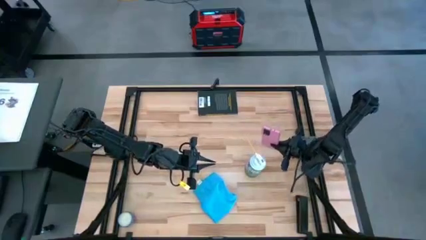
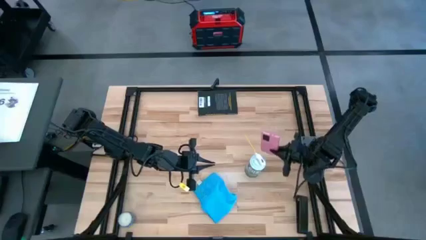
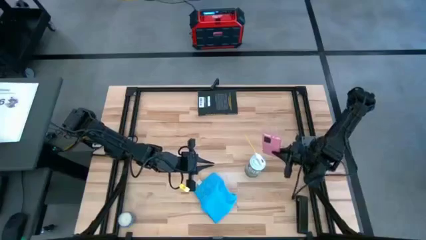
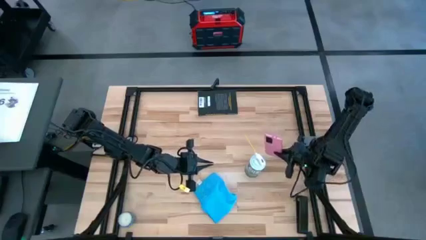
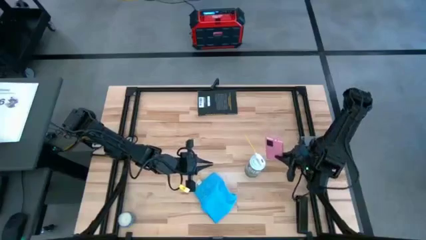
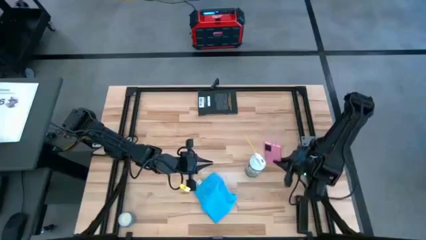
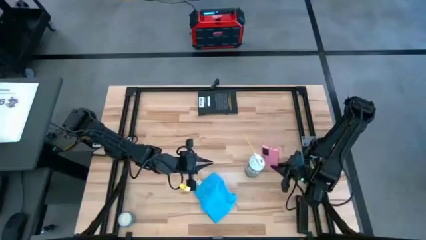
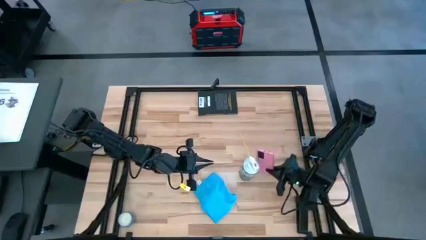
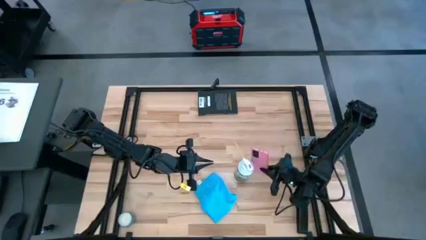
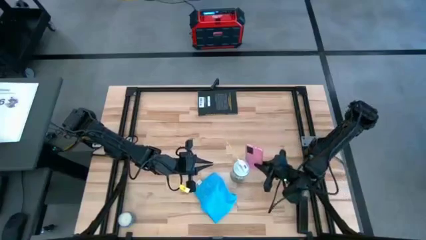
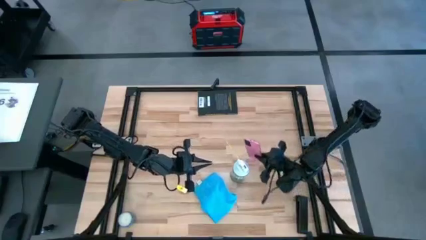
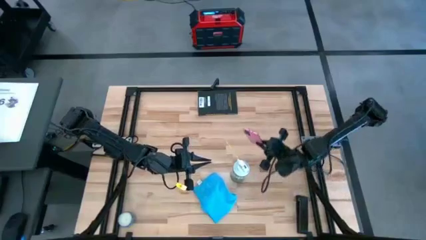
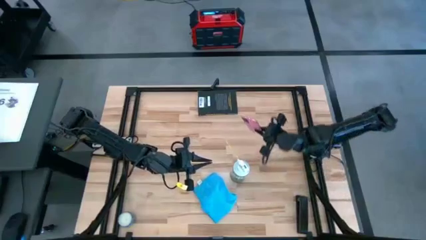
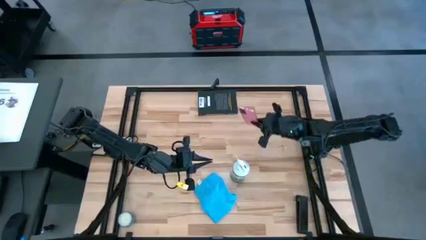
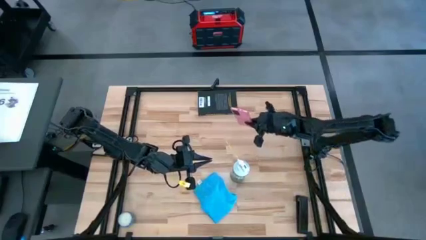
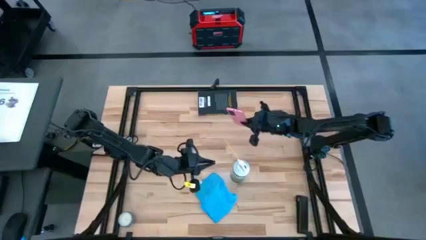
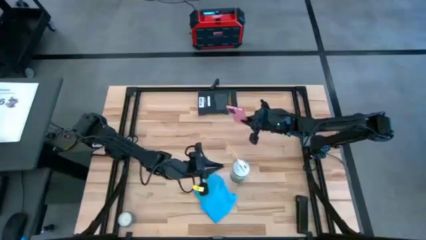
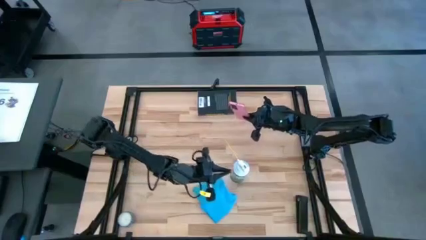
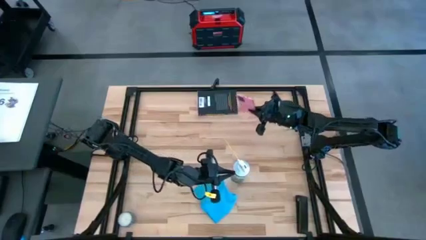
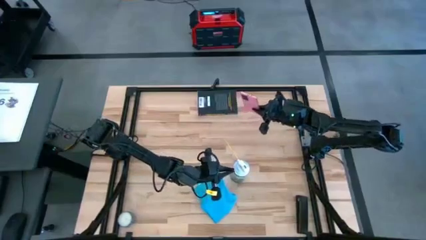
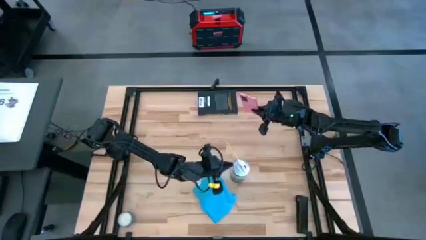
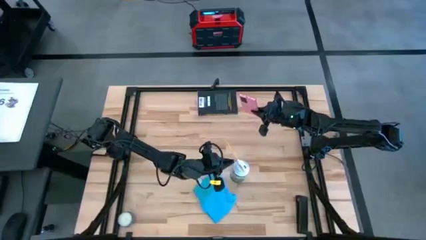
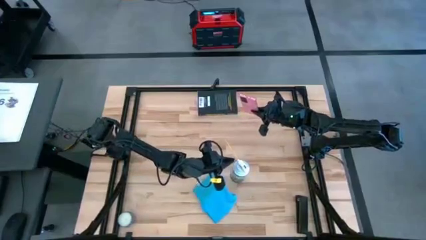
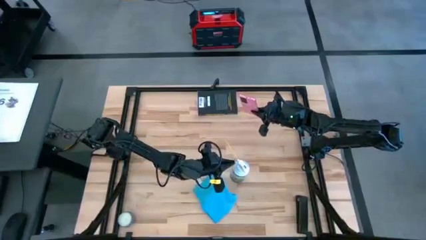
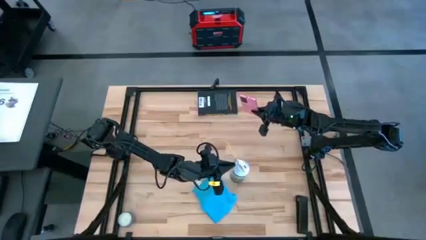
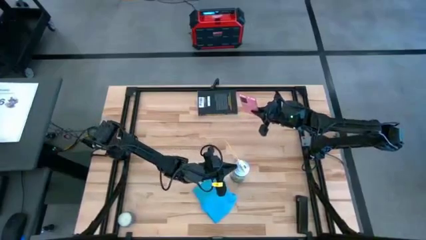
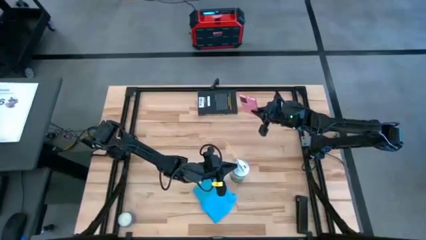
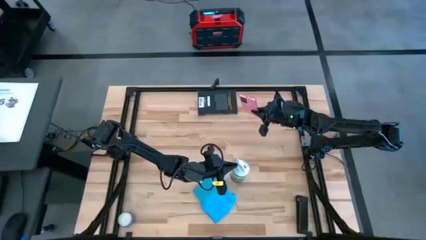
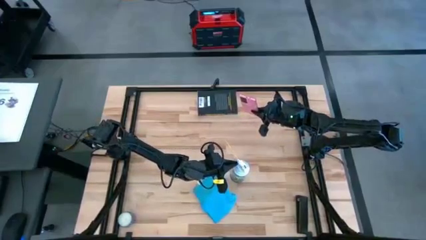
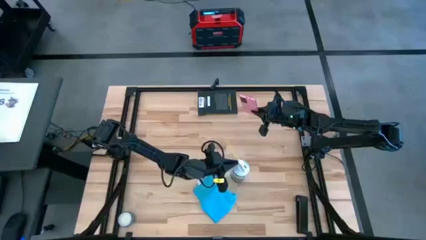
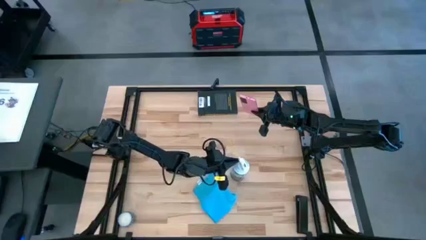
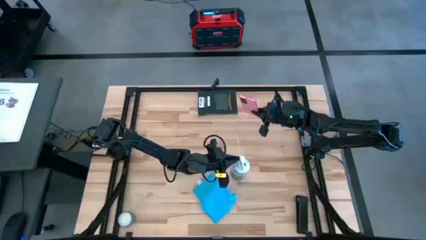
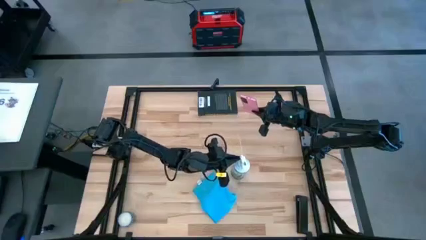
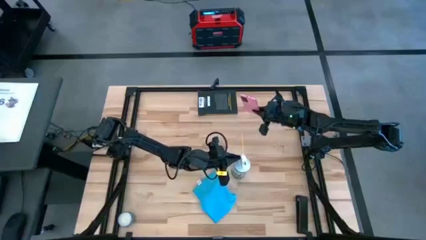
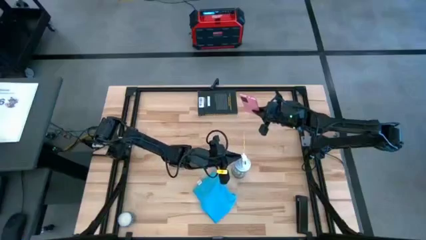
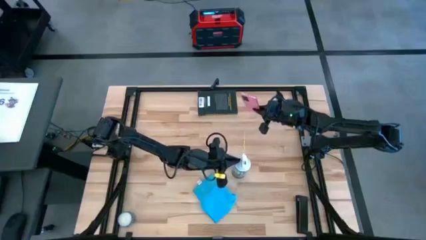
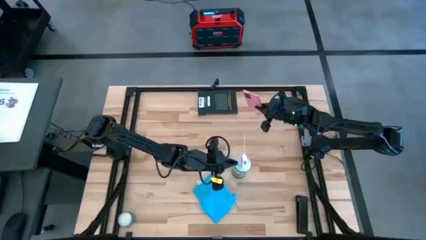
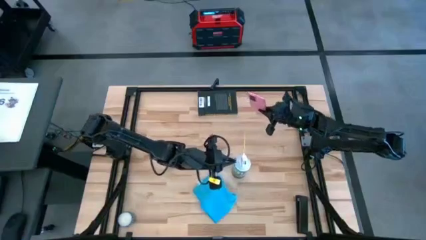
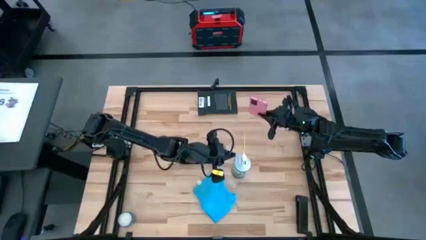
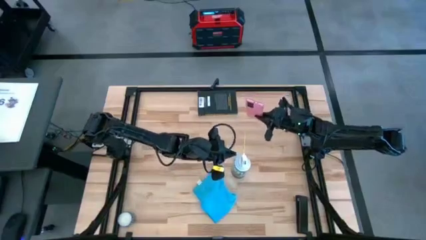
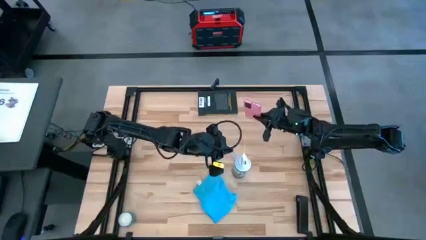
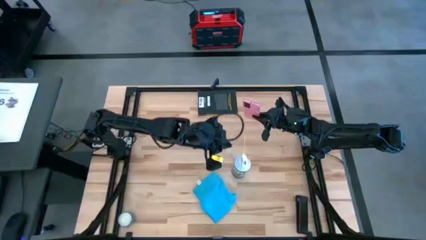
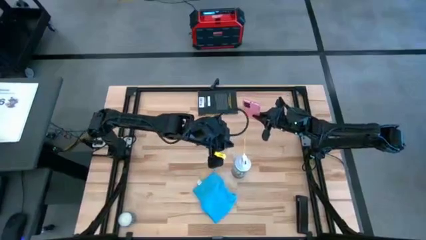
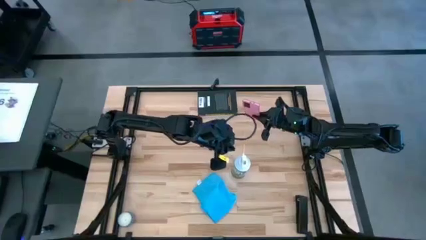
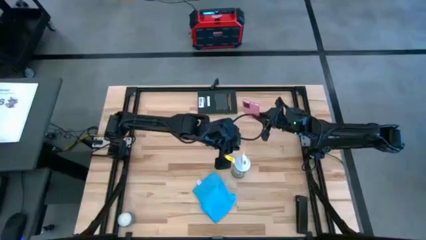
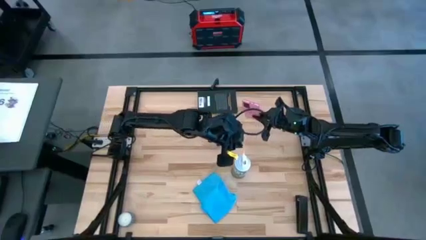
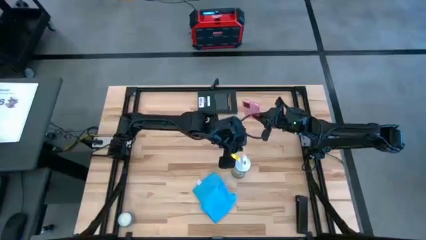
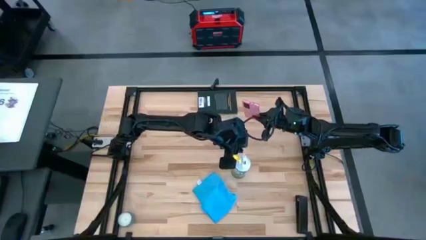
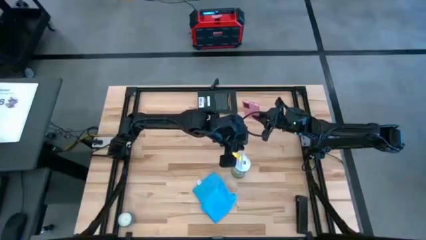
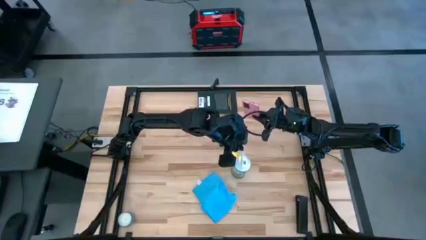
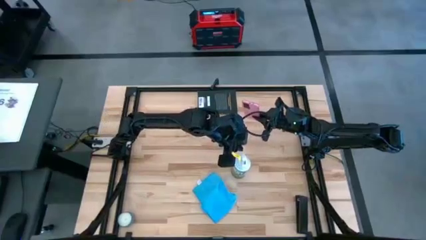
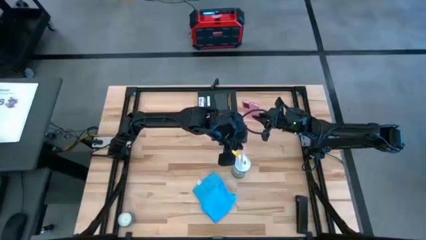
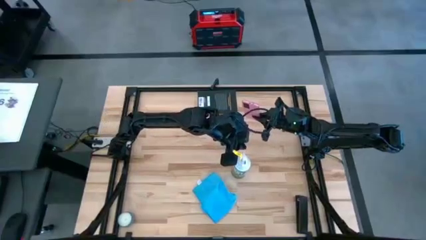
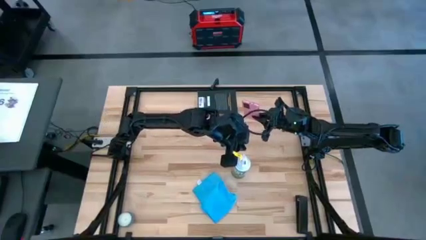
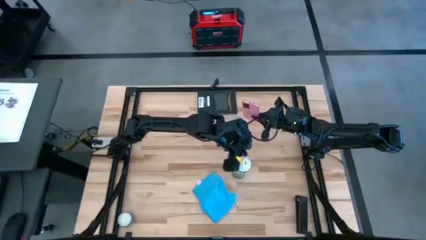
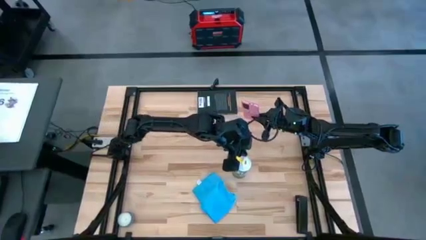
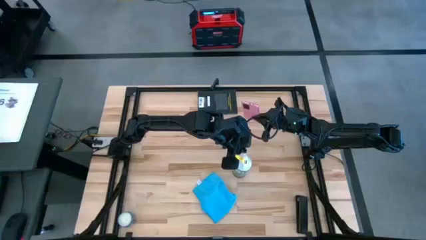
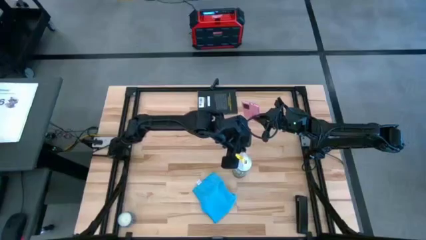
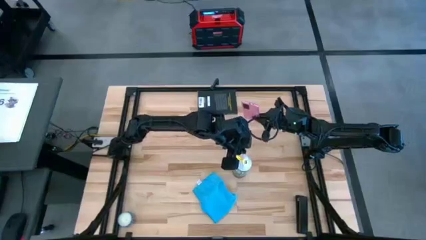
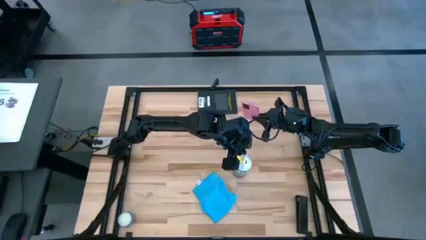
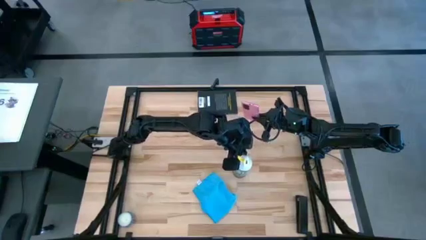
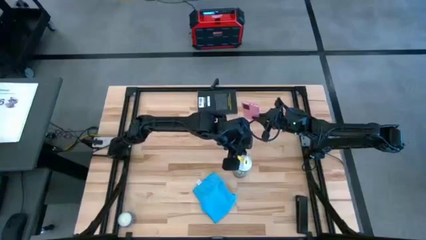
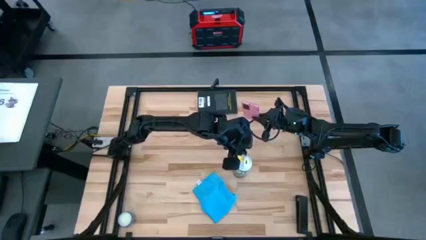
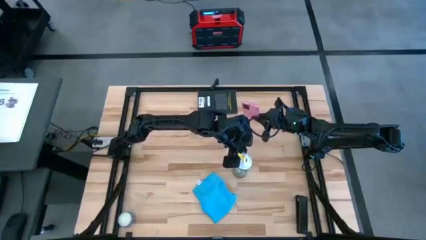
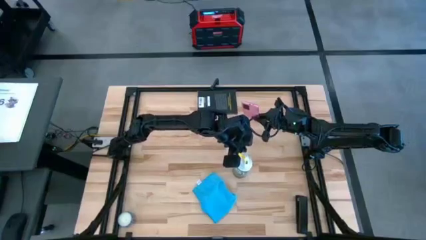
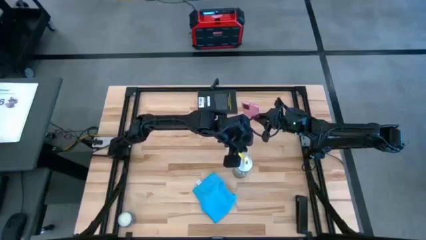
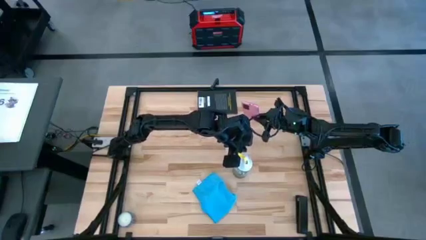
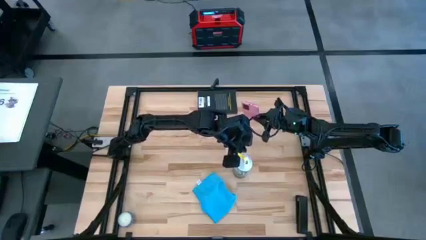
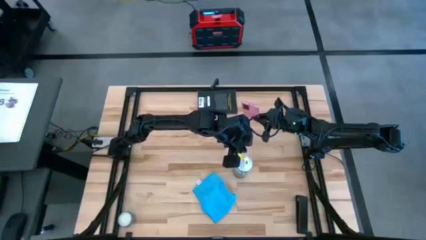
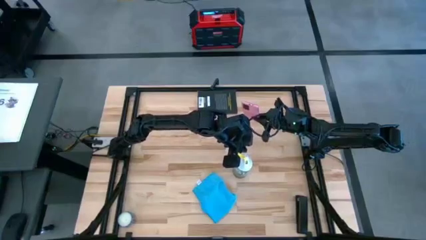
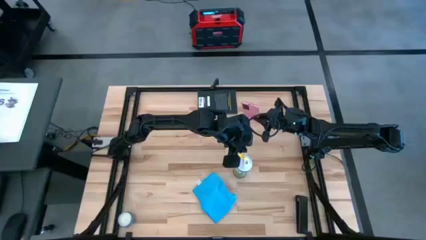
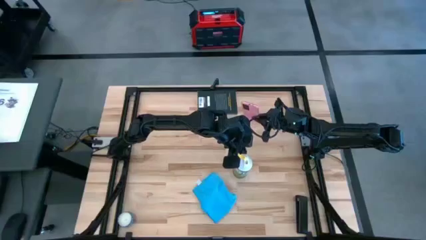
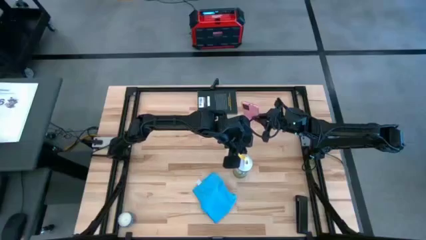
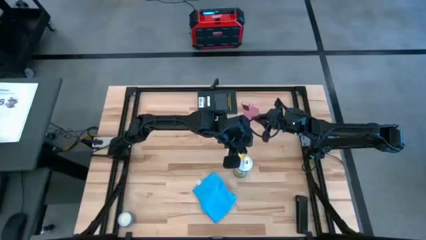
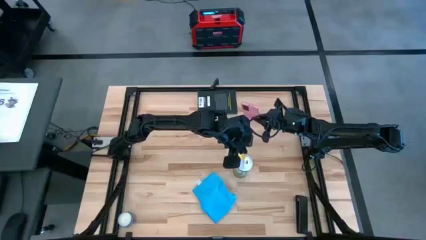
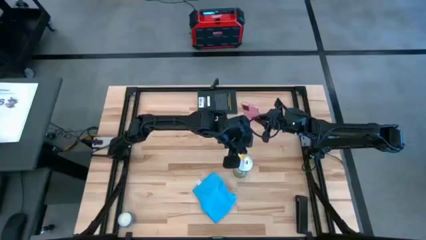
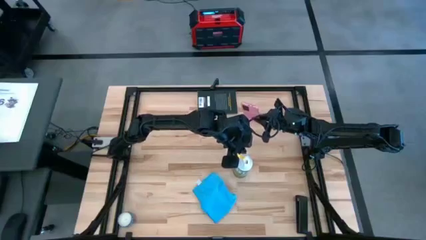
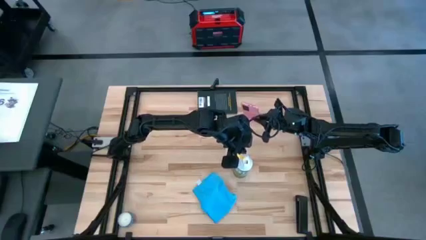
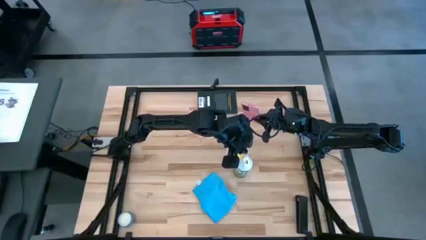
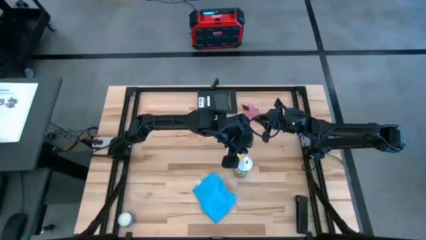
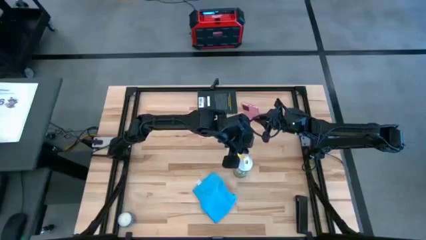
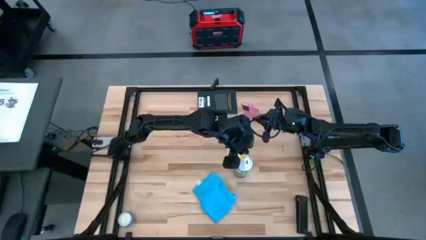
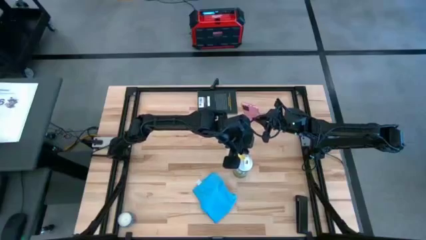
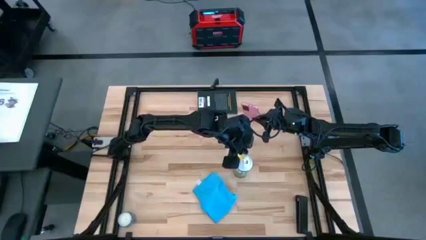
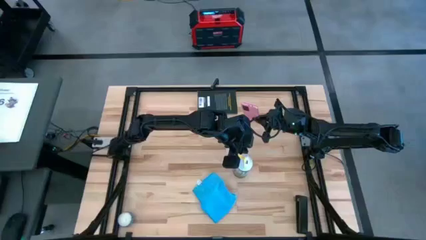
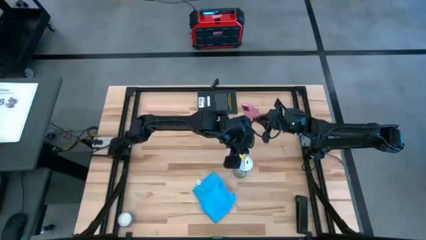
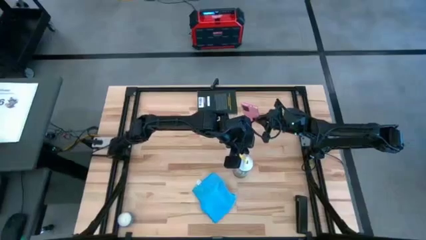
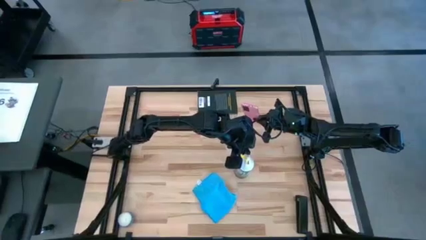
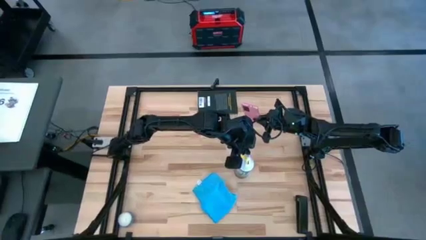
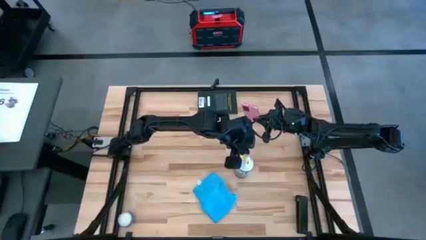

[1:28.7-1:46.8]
Task: Apply microfiber cloth
Spray the back of the cellphone with the spray bottle
